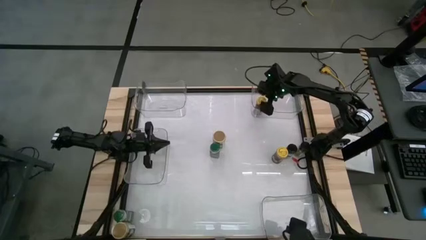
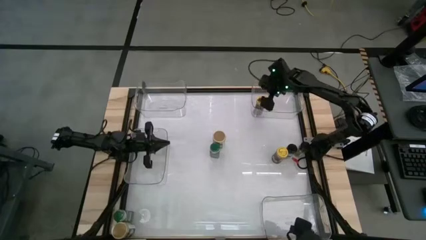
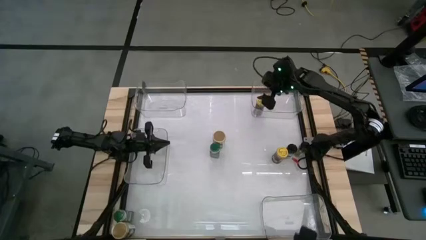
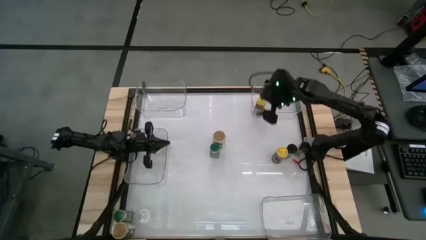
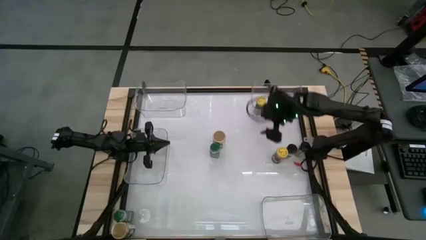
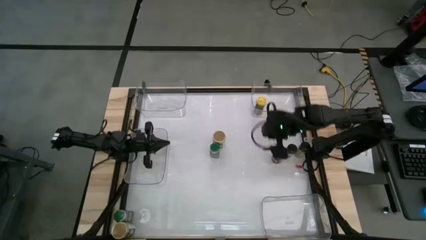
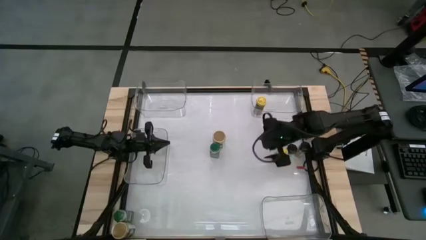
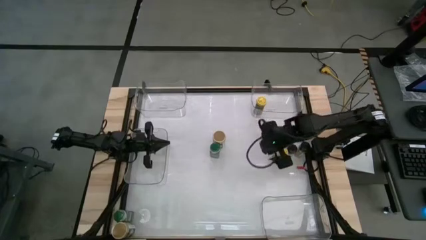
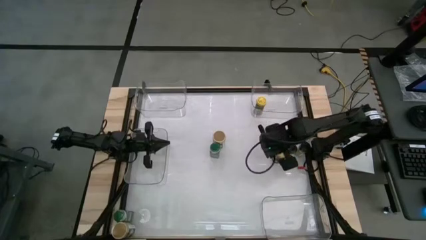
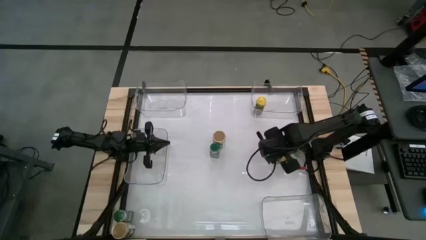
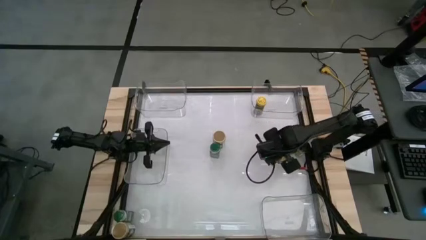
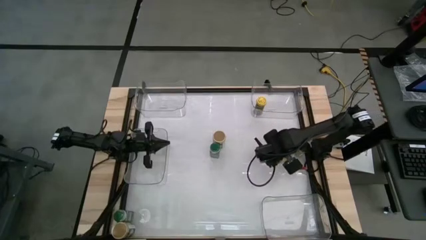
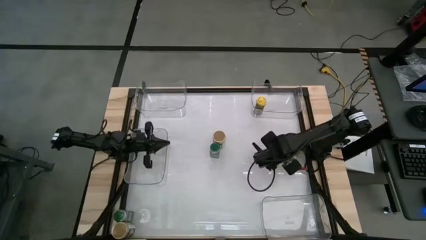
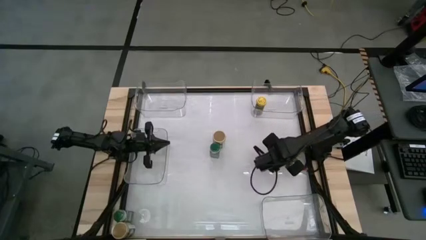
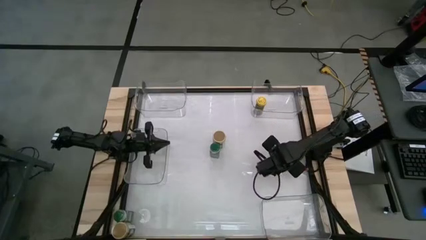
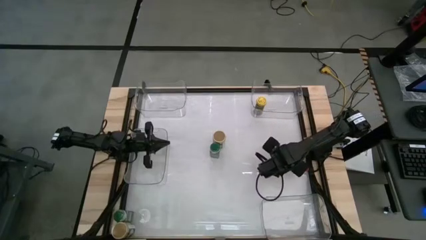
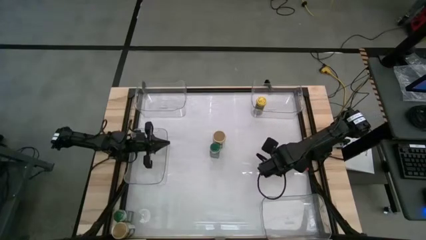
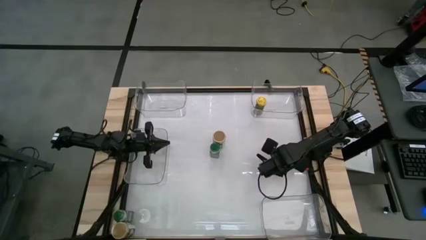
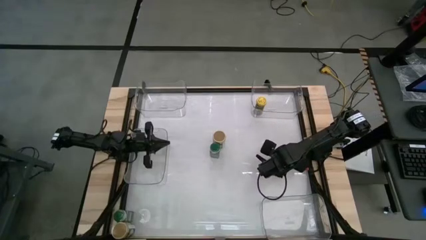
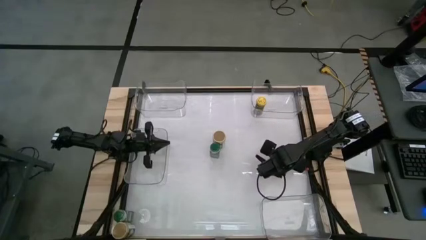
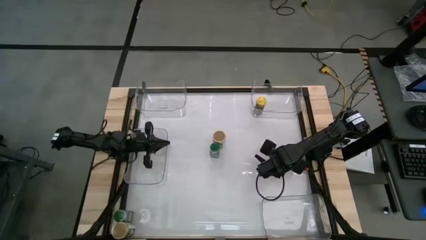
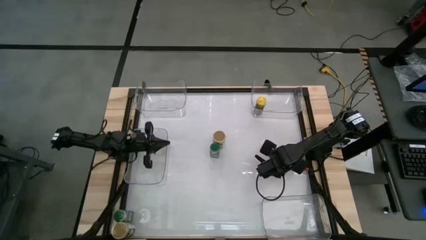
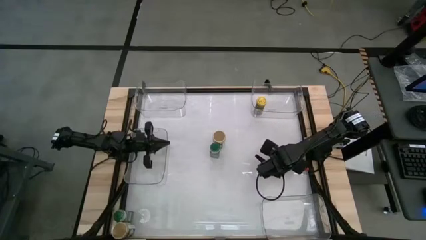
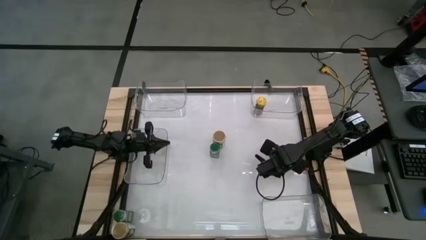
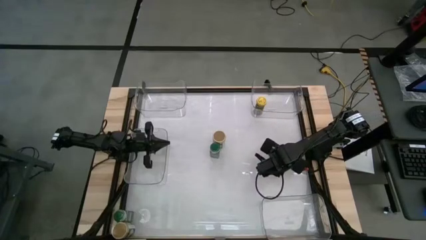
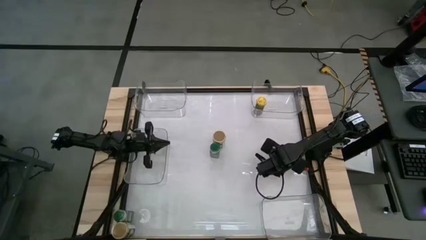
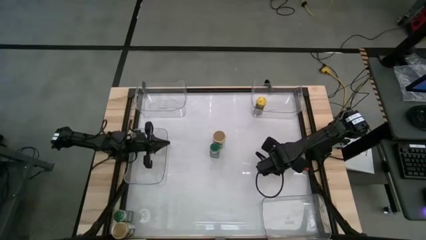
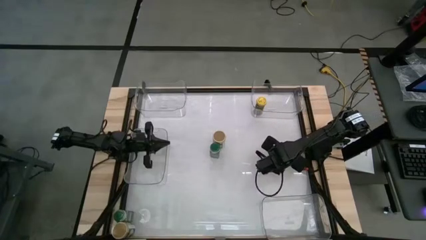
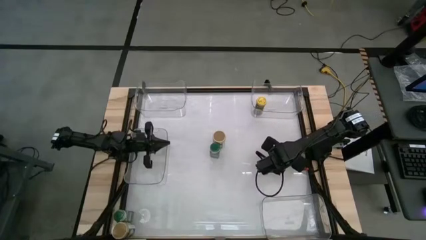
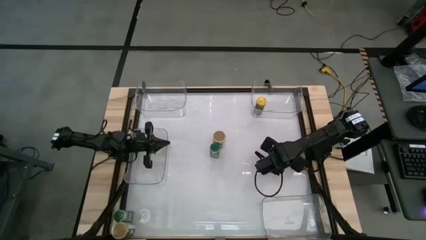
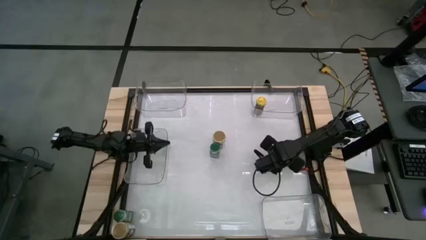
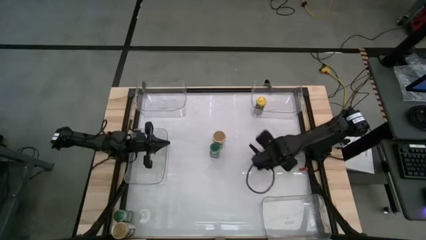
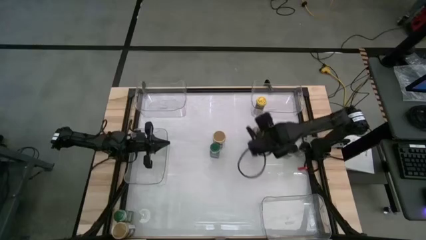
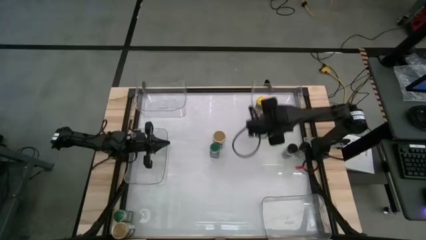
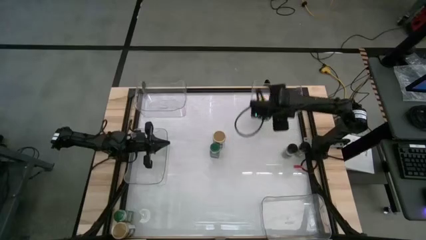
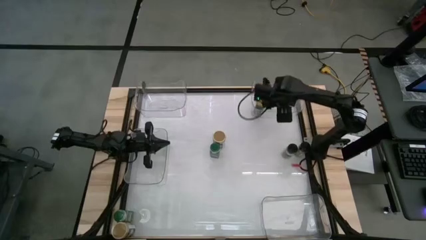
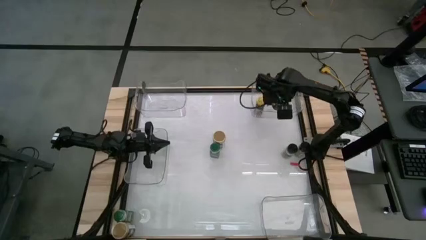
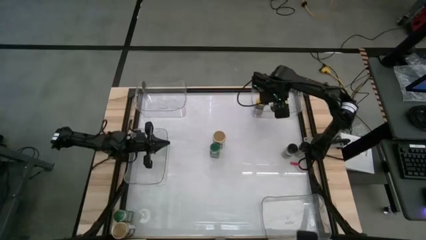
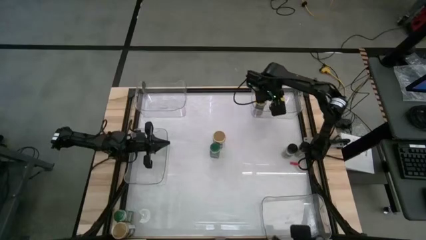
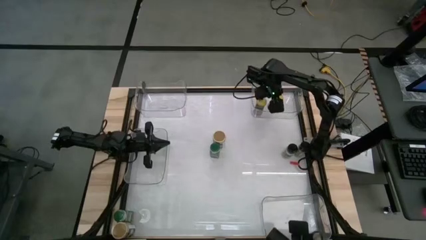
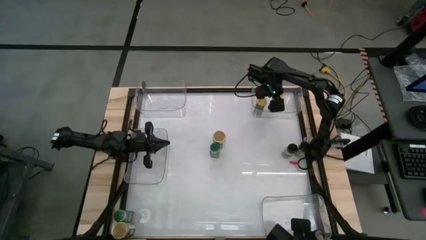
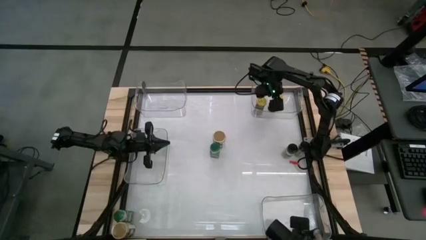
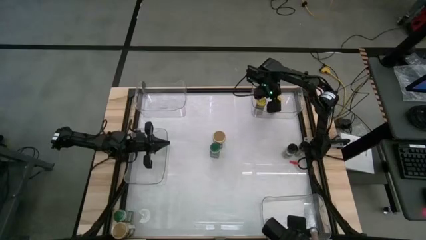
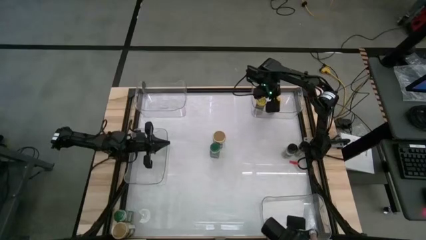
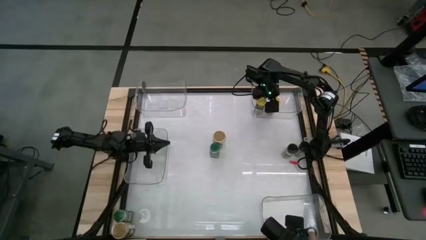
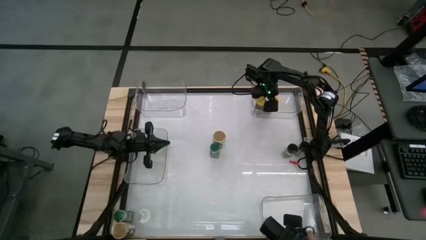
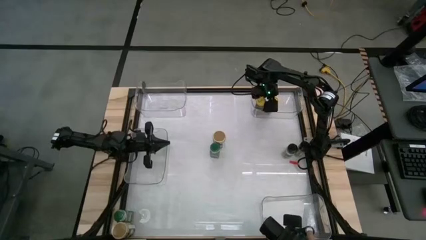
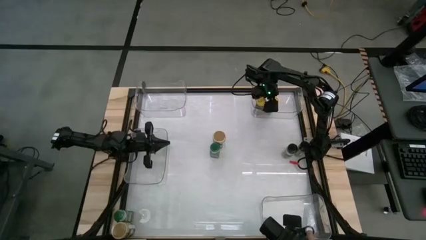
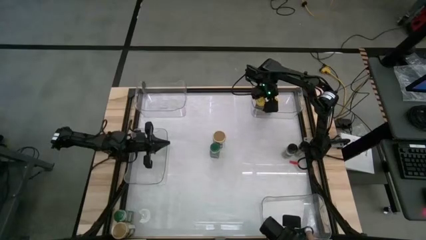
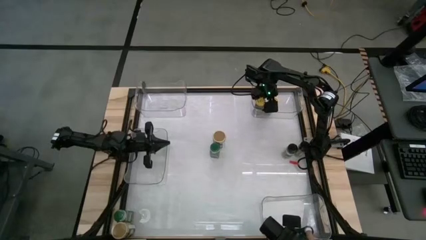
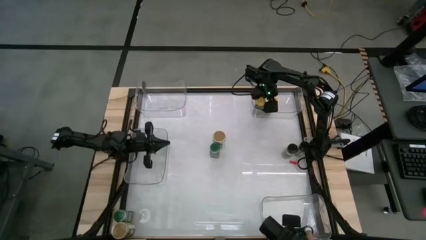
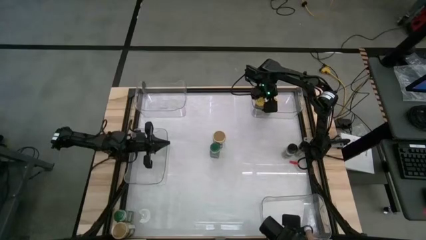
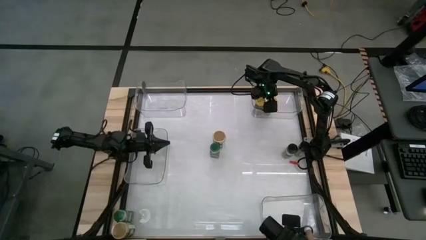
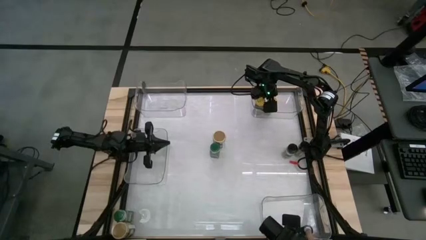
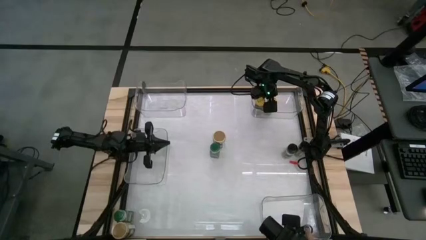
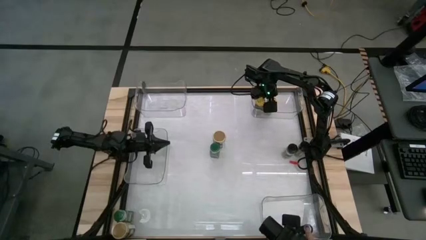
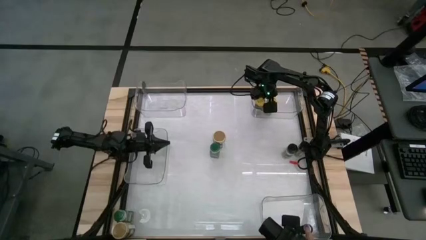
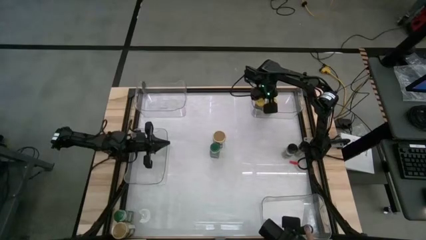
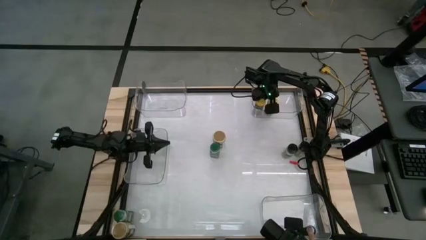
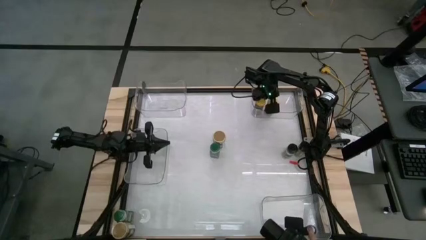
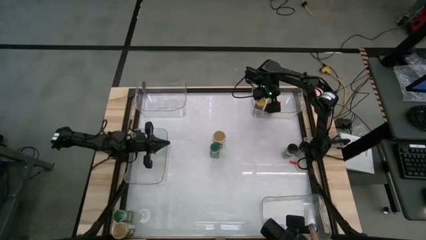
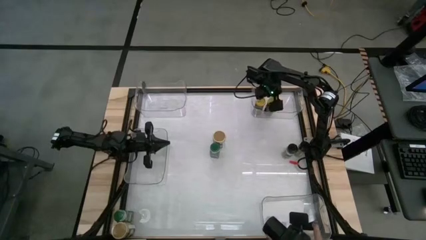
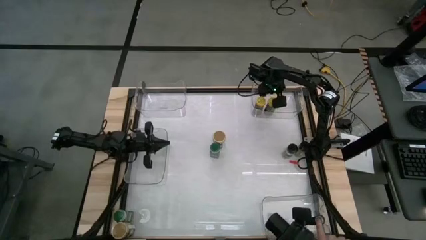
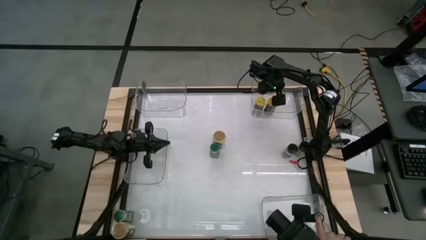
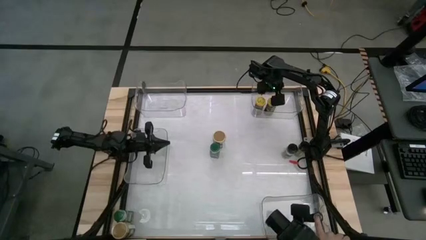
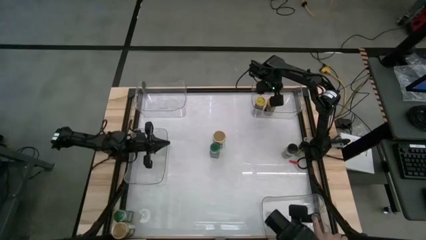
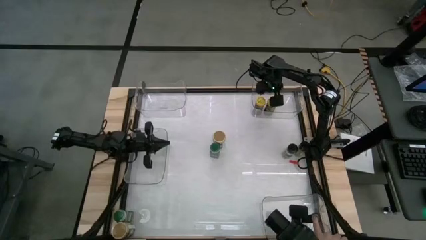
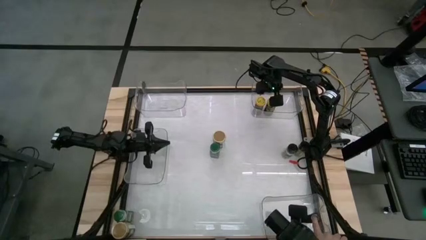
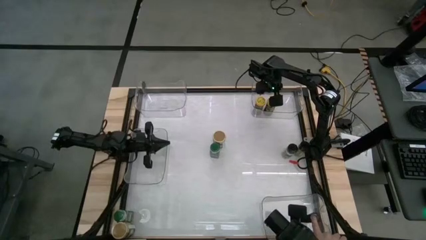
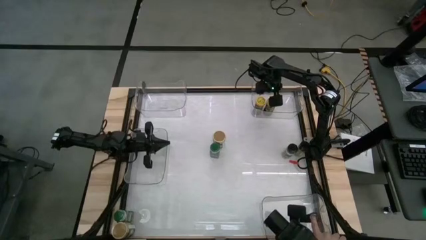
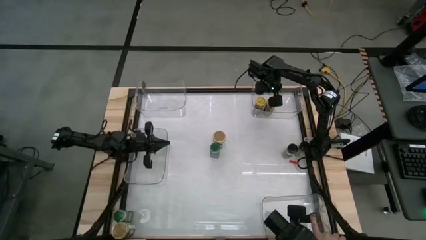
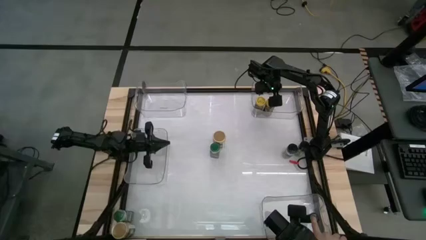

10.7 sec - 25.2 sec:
Task: Sort spices by type
Put the yellow seasoning bottle into the top right transparent bin
